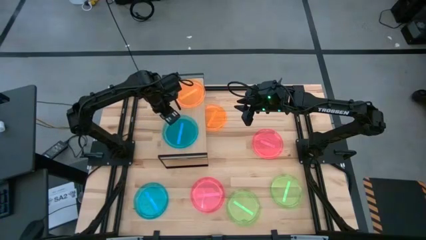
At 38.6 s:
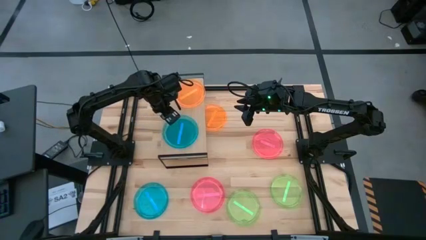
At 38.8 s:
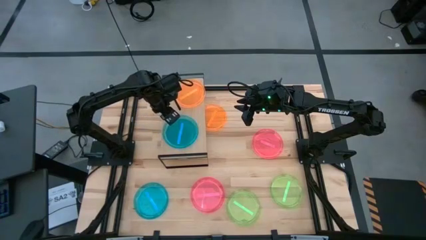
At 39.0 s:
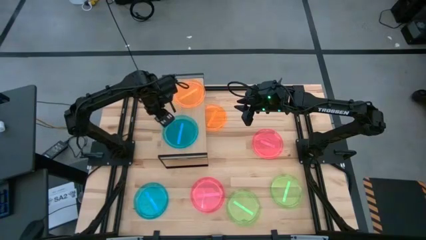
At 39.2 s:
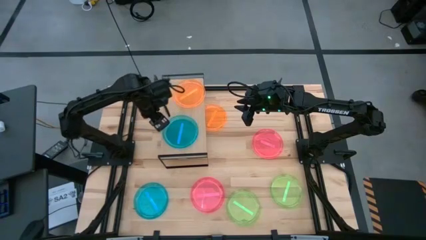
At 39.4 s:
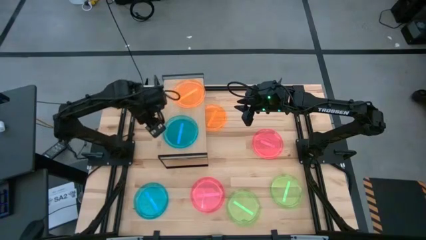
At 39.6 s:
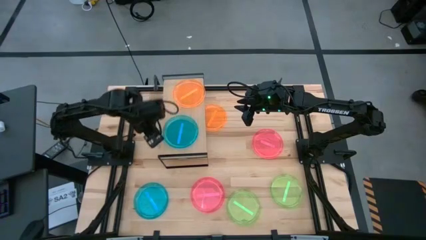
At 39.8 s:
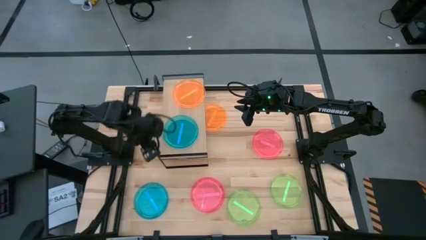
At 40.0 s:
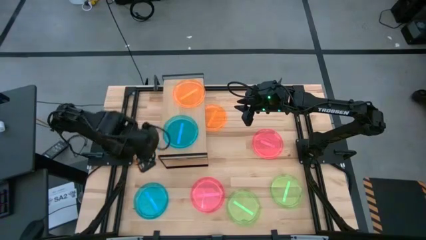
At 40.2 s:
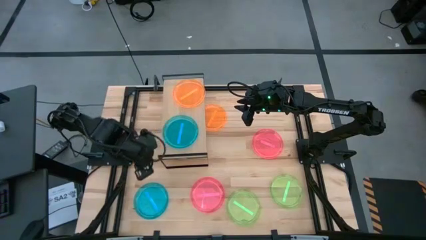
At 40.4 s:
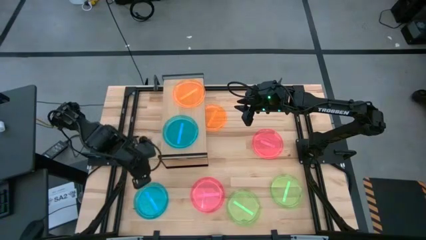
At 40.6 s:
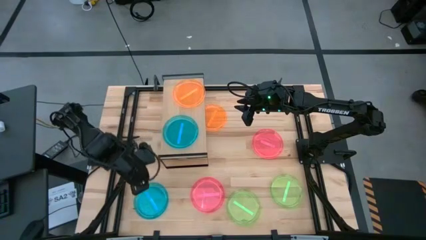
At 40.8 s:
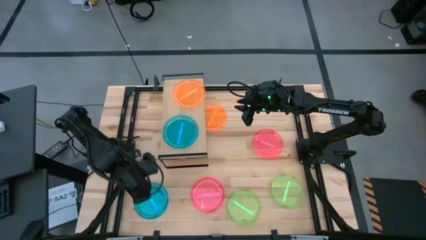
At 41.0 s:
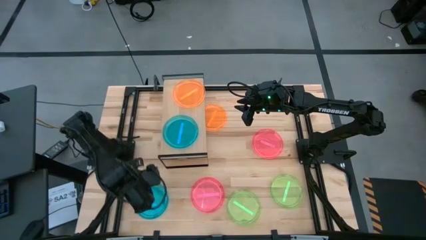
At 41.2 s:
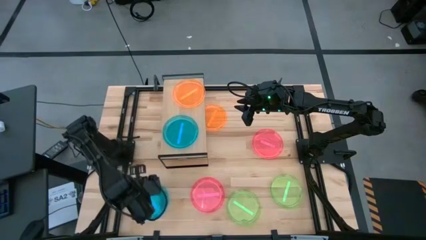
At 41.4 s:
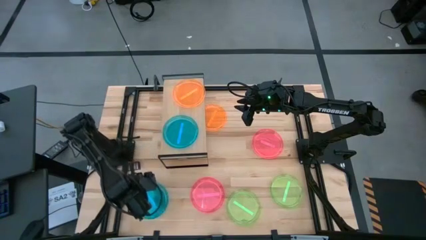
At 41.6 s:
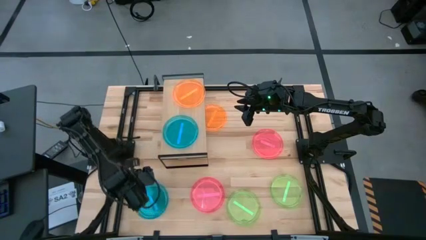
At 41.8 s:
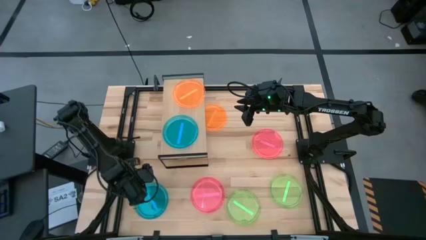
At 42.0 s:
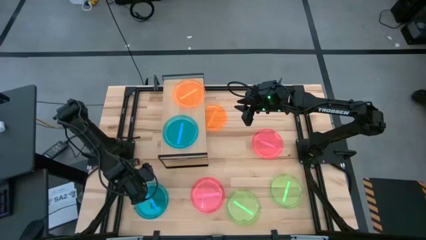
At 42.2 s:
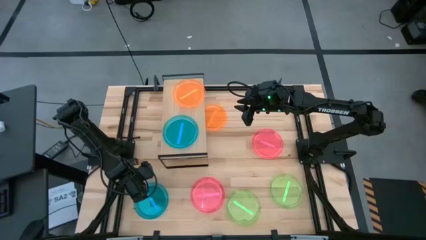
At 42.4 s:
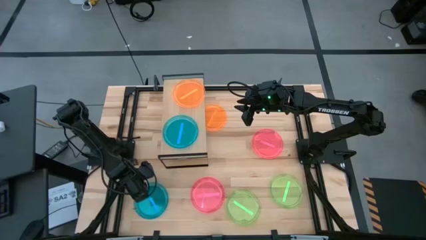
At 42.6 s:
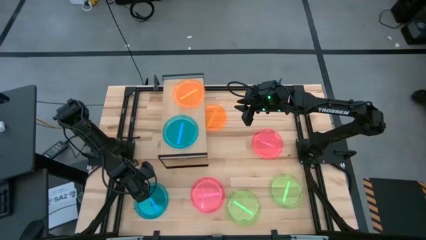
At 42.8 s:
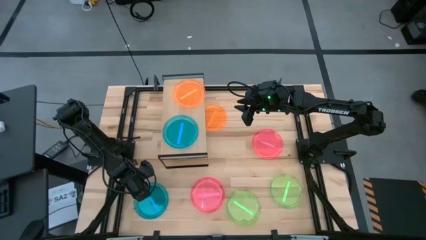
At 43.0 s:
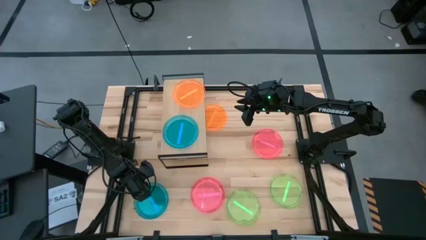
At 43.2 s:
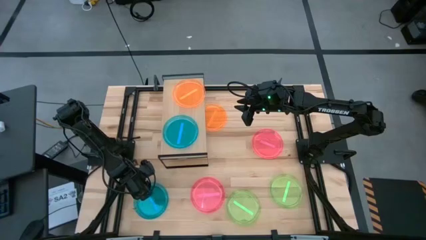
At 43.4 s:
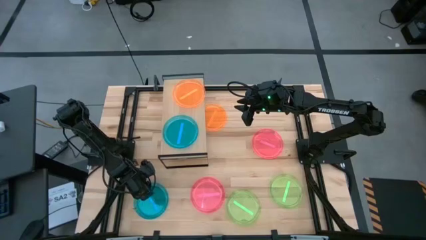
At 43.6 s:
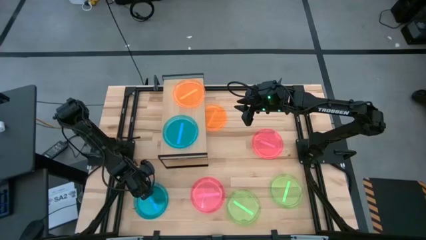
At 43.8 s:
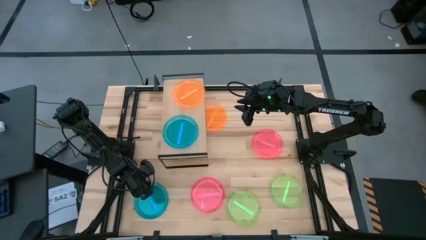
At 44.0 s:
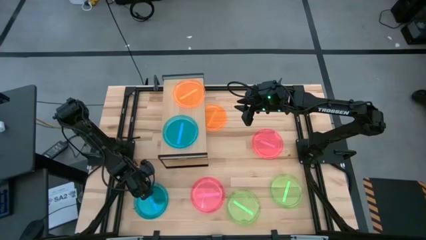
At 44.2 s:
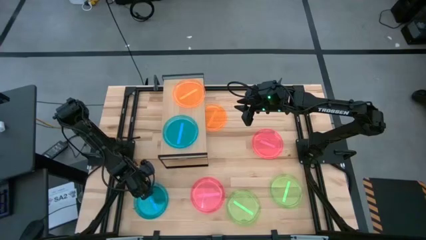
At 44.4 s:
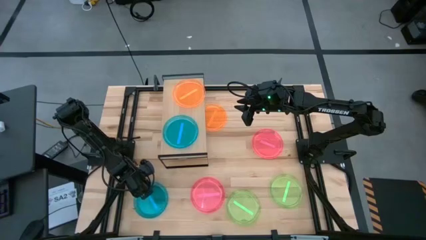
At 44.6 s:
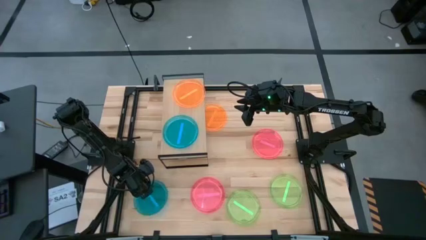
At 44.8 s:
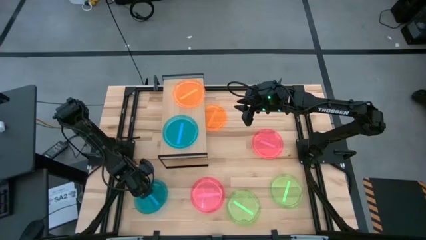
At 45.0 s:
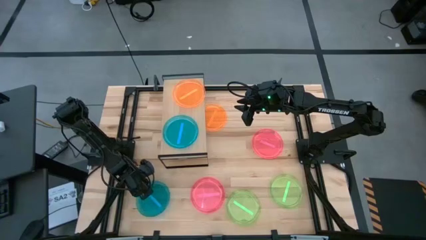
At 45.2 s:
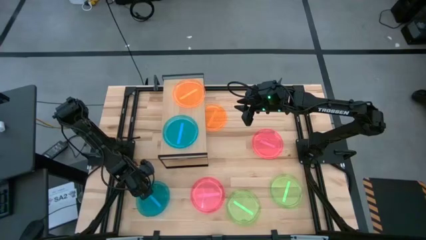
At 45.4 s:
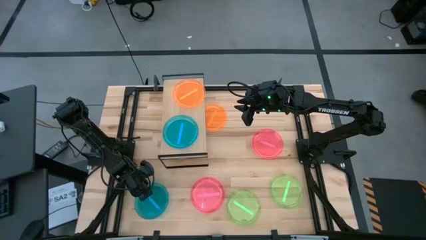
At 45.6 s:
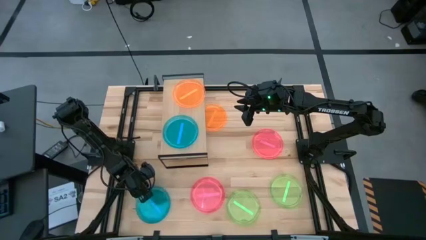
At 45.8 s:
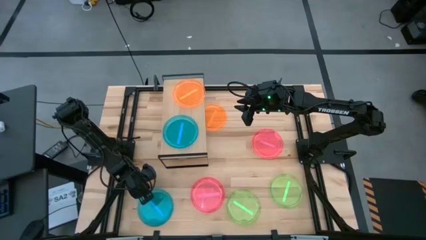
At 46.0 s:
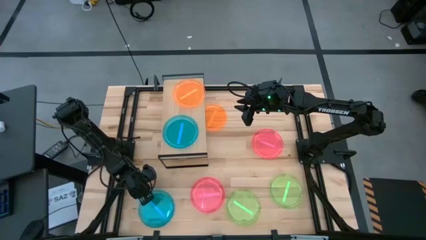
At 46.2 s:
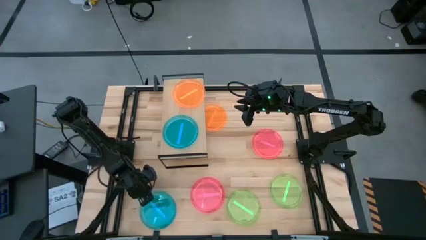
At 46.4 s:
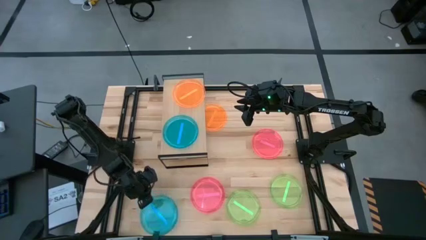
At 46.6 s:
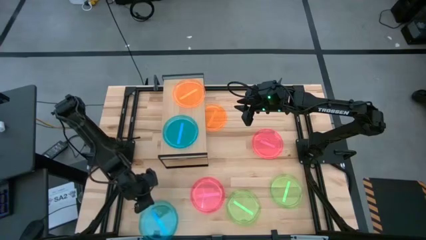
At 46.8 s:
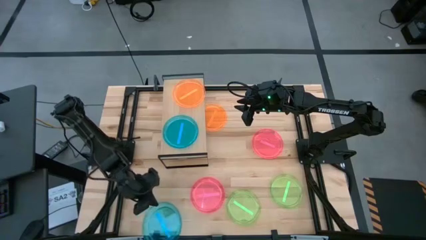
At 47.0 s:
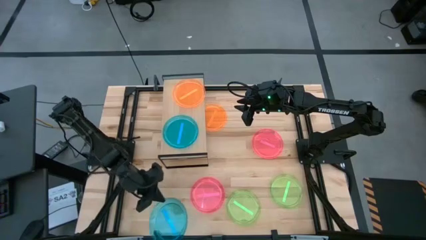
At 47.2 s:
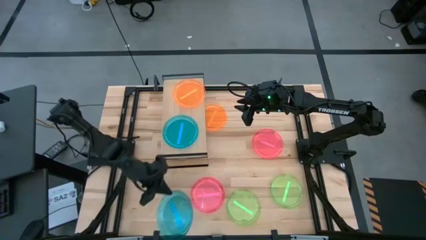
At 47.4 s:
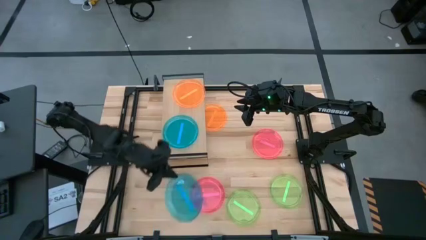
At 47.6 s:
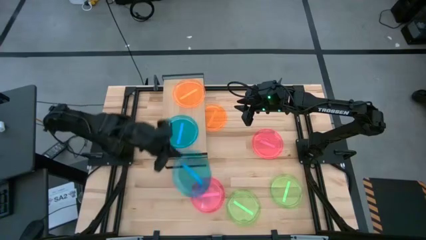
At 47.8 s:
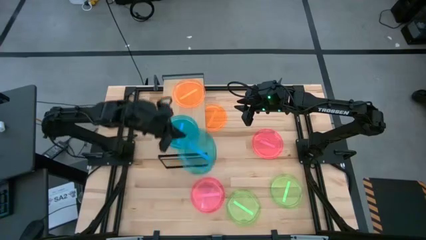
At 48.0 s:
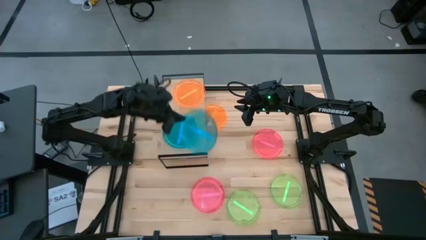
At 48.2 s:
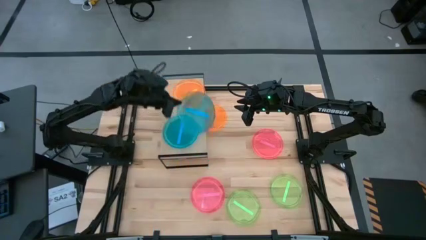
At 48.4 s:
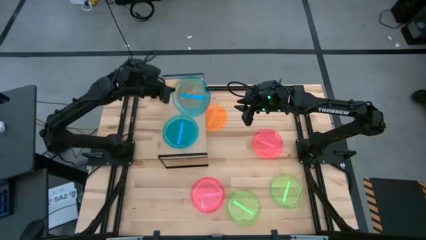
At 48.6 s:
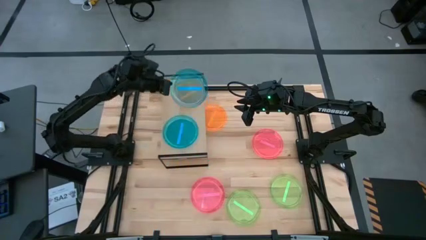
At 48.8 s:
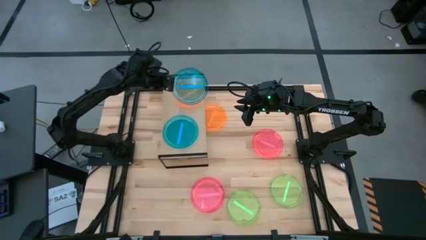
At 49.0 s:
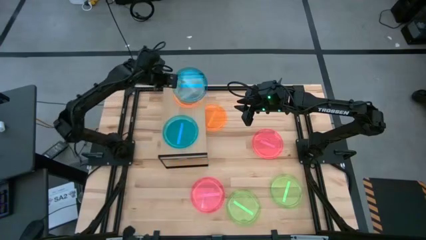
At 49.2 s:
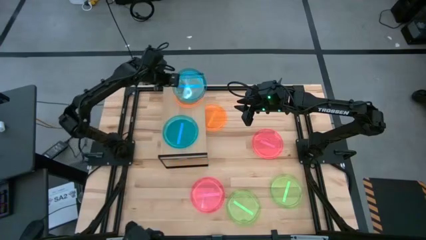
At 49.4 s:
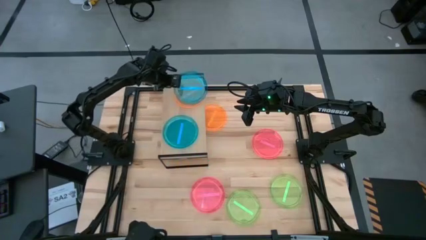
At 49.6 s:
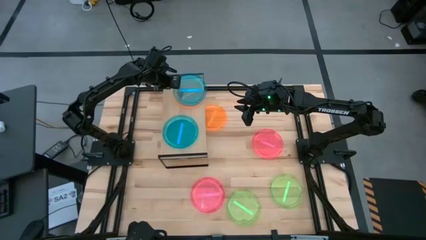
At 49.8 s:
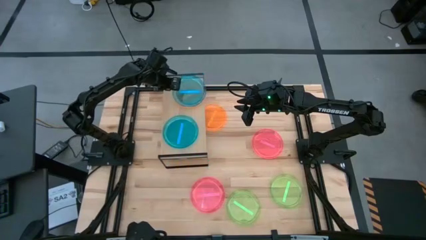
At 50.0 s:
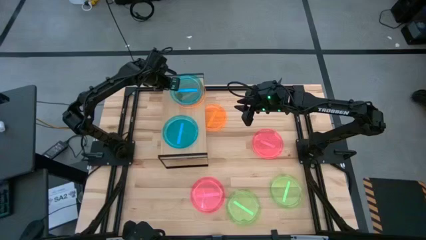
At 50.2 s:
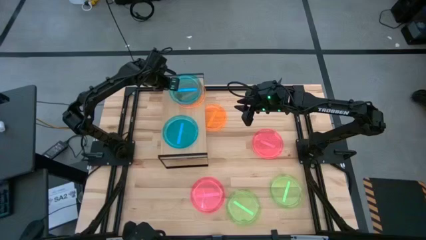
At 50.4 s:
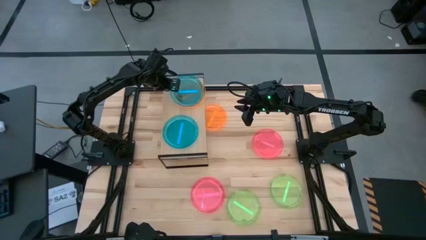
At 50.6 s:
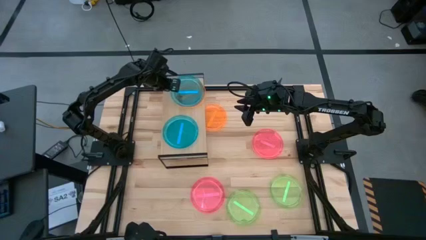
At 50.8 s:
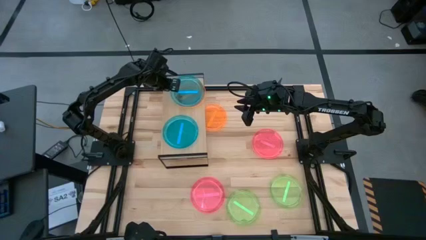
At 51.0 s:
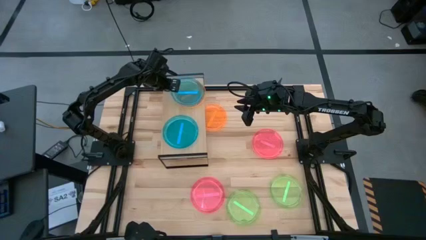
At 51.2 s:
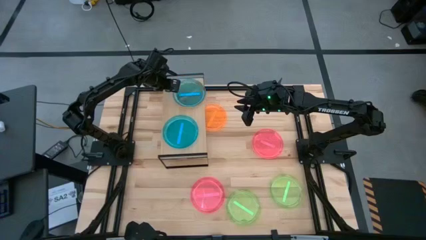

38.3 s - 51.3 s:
Task: Place and stack plates onto a shelf
Stack the blue plate on top of the orange plate on the shelf
